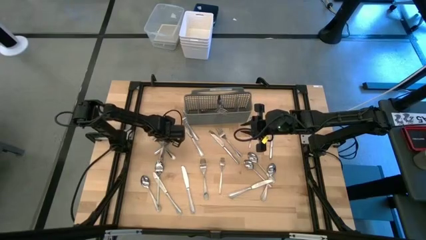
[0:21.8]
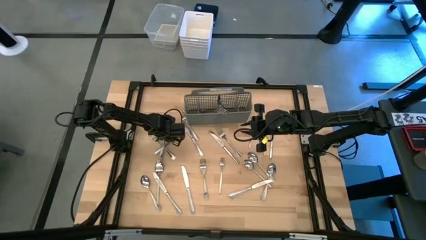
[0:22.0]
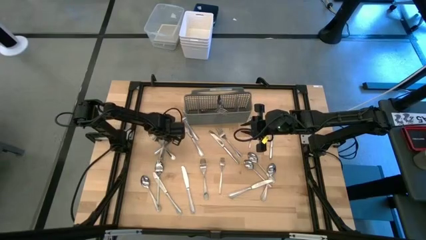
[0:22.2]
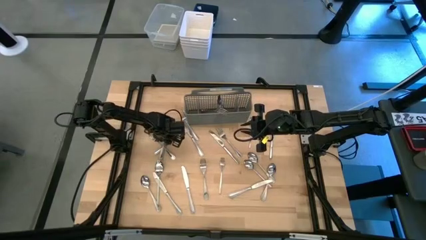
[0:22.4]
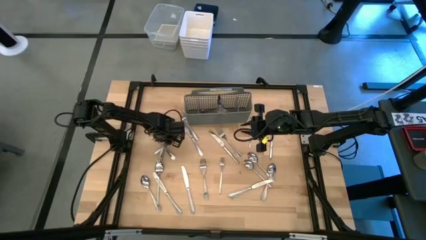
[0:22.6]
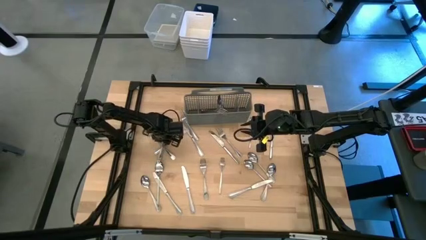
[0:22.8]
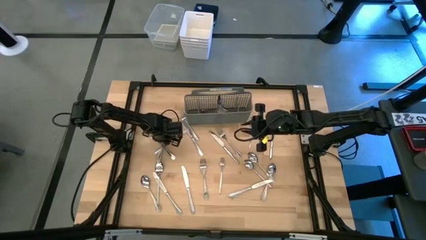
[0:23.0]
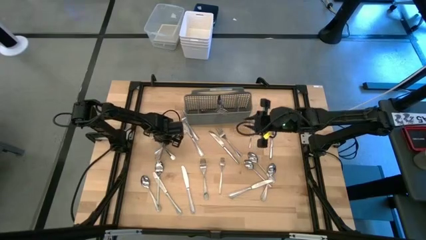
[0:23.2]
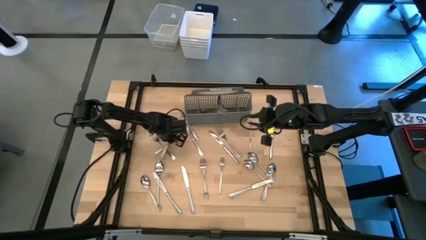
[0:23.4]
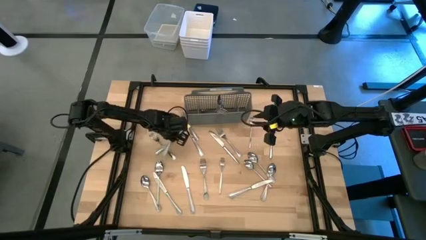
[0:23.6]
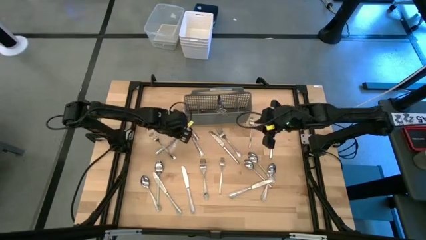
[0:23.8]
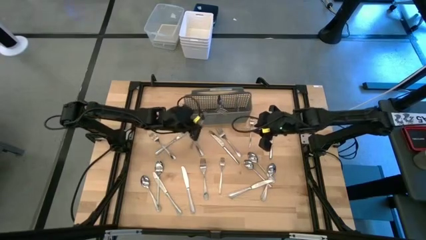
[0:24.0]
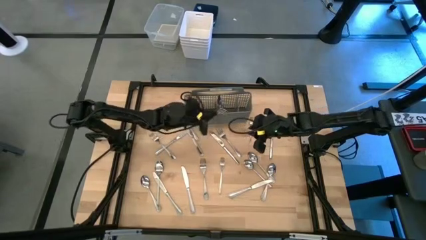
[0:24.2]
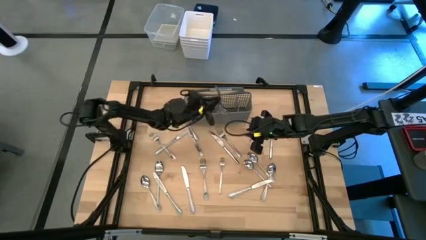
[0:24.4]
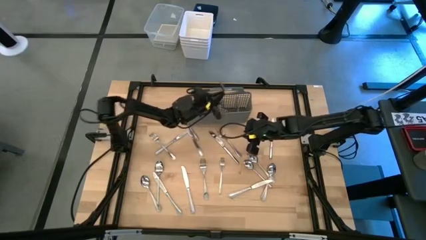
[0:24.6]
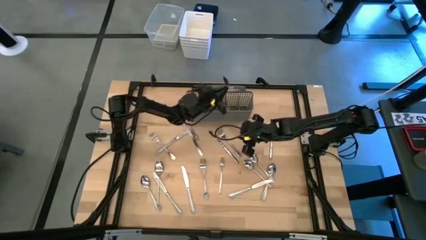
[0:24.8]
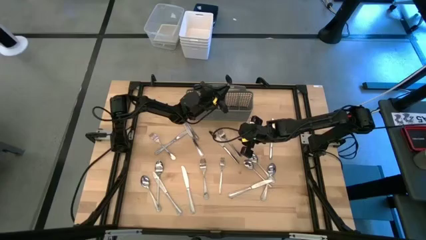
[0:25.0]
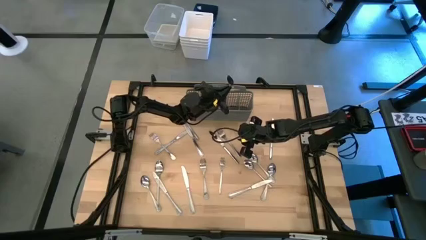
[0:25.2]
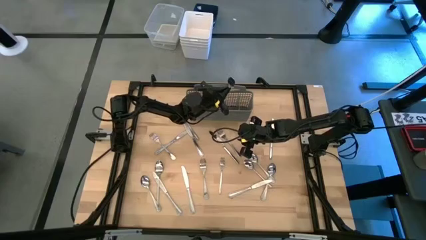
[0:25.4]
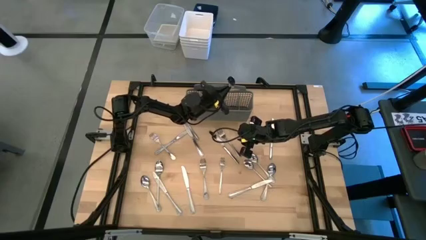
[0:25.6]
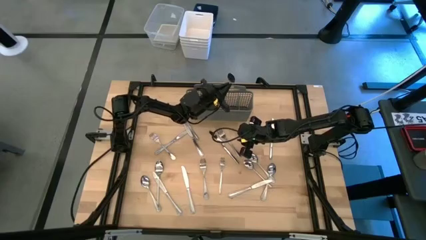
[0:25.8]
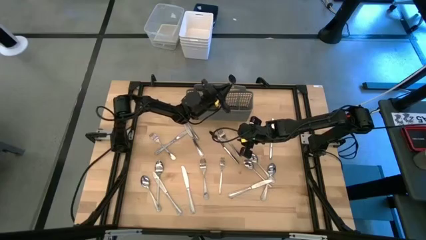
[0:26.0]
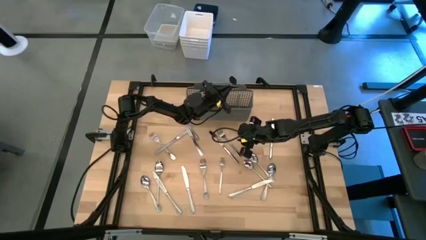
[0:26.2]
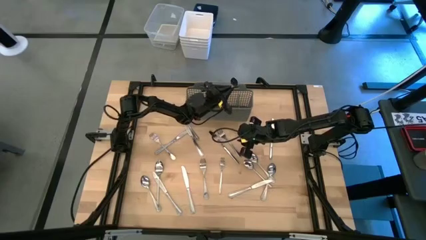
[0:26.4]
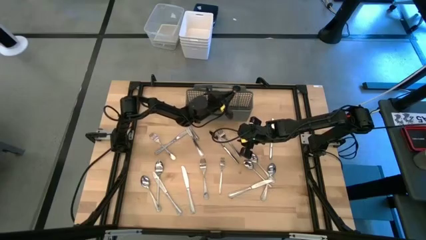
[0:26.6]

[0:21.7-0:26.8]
Task: Sort silverware
Put the silver spoon into the gray silverware organizer

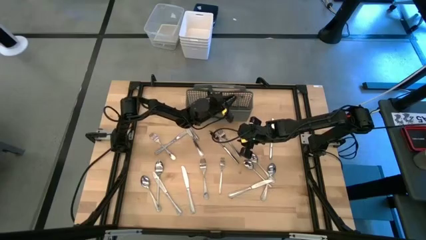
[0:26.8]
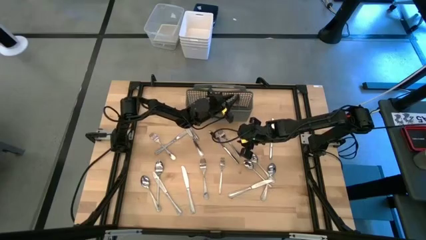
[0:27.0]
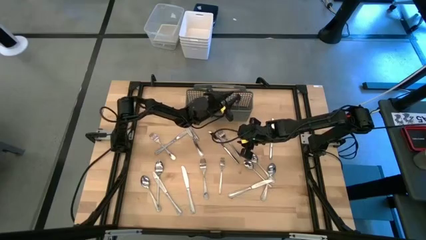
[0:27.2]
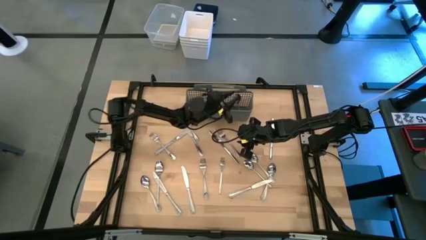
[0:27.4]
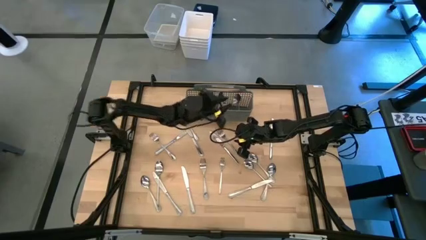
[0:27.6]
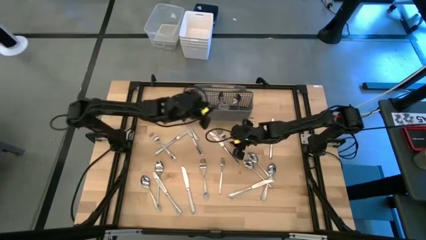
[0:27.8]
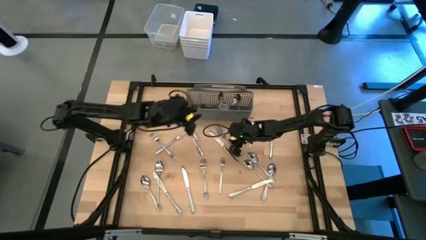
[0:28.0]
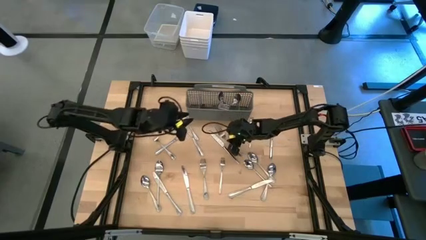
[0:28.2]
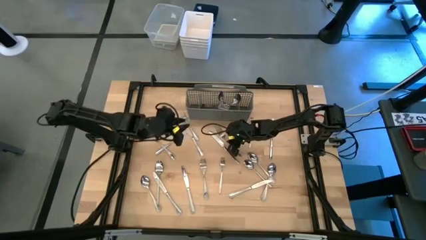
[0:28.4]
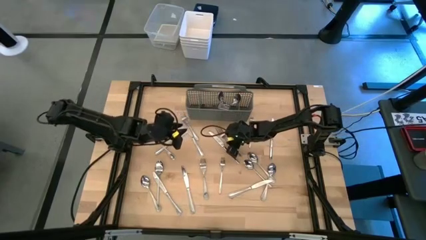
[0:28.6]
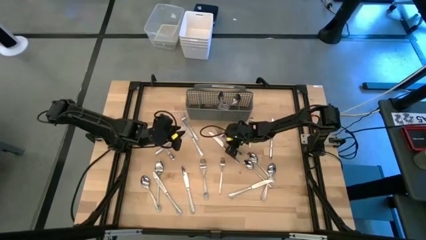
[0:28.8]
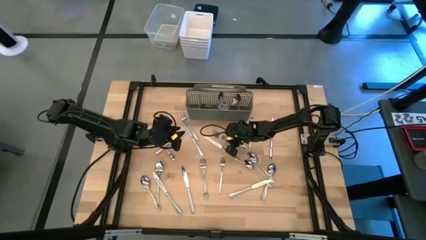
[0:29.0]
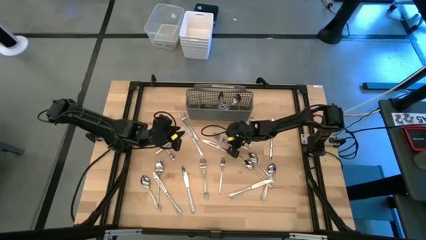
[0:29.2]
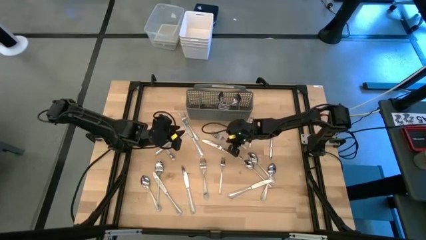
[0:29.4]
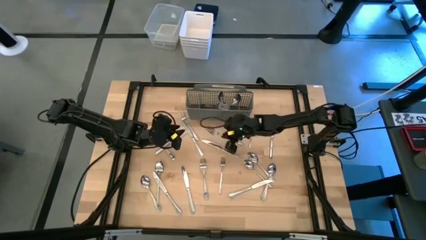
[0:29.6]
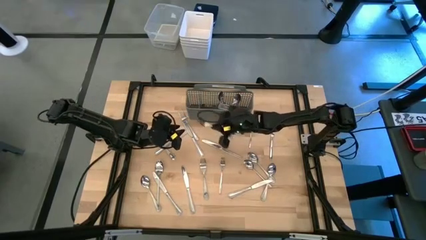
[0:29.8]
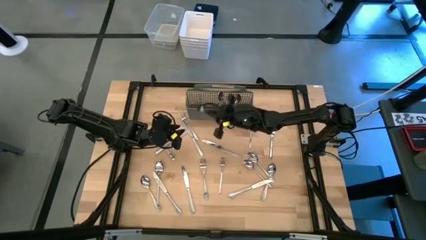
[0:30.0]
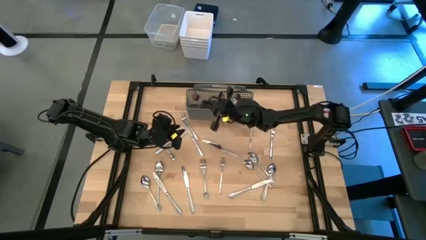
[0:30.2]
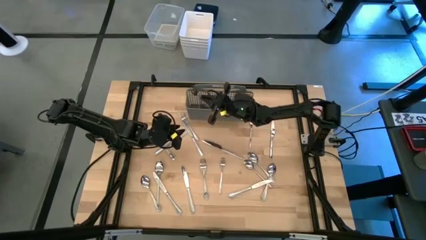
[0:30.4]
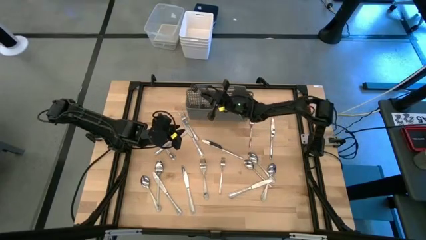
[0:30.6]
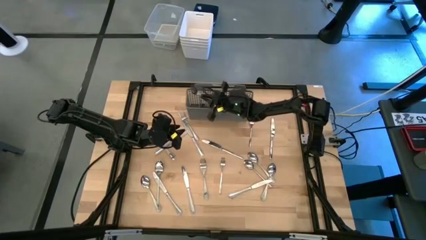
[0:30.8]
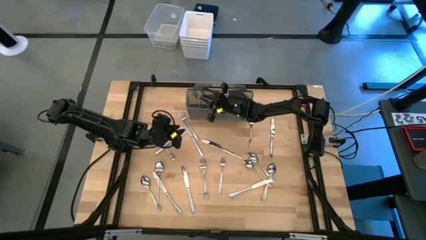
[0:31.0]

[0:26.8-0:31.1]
Put the silver fork into the gray silverware organizer

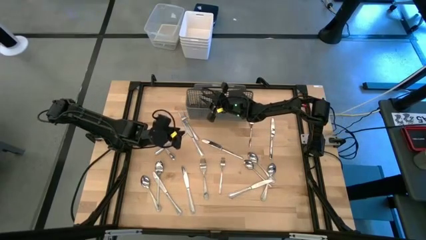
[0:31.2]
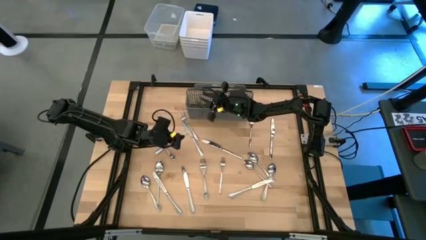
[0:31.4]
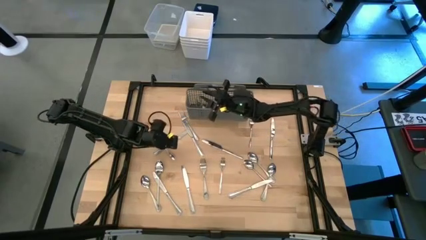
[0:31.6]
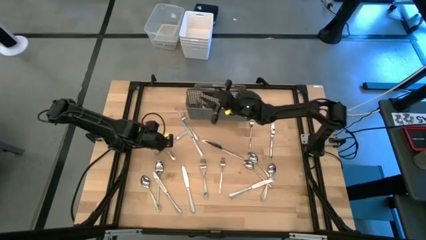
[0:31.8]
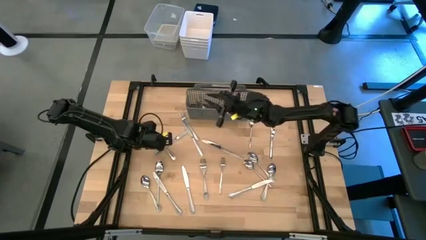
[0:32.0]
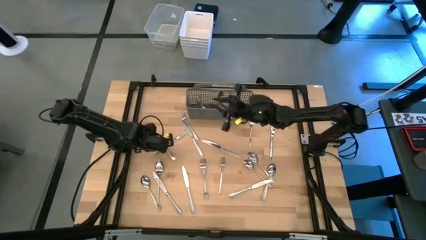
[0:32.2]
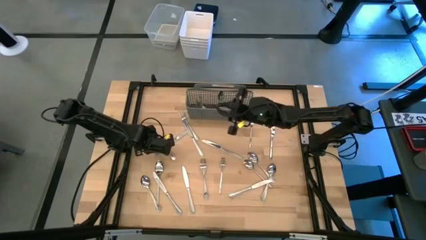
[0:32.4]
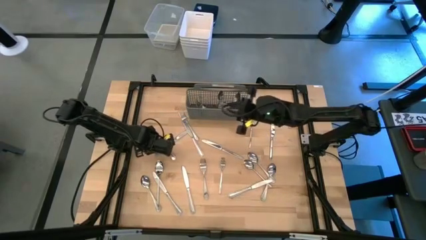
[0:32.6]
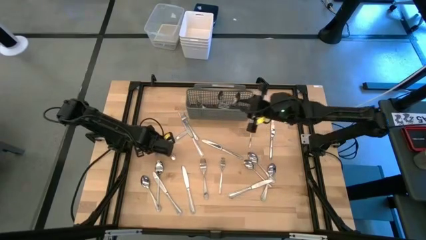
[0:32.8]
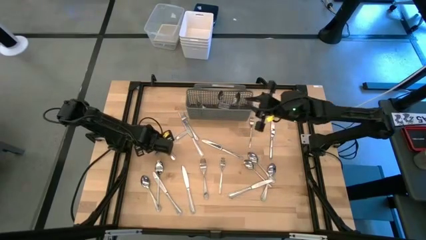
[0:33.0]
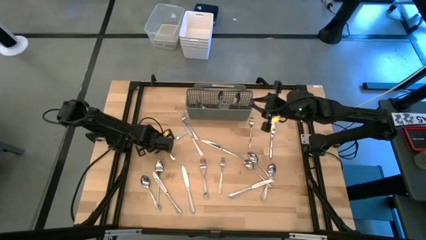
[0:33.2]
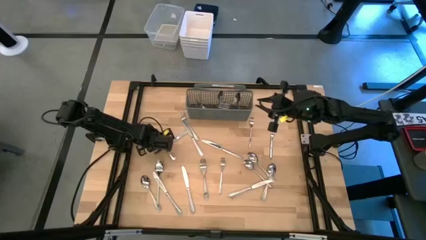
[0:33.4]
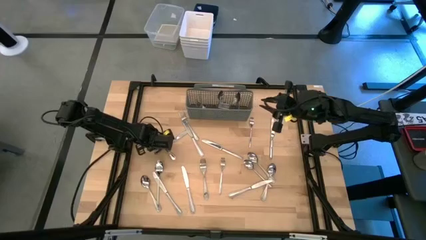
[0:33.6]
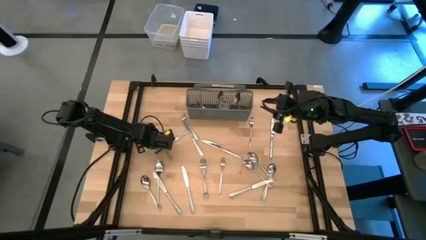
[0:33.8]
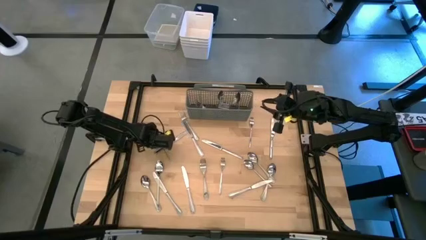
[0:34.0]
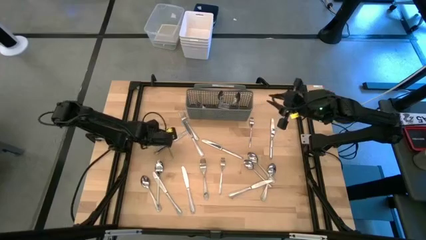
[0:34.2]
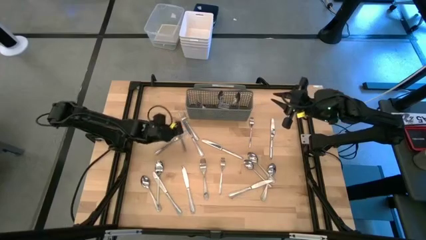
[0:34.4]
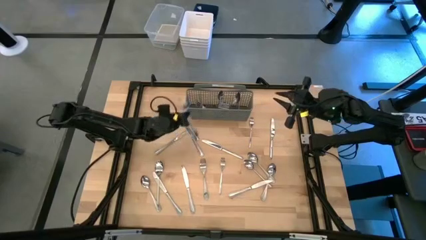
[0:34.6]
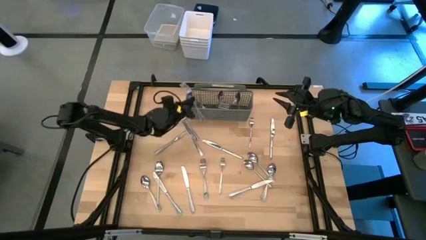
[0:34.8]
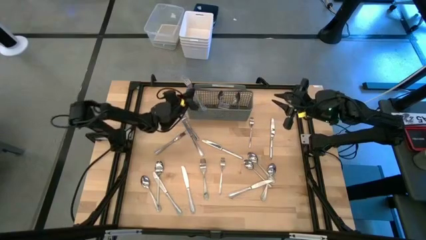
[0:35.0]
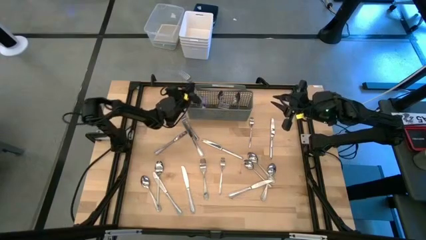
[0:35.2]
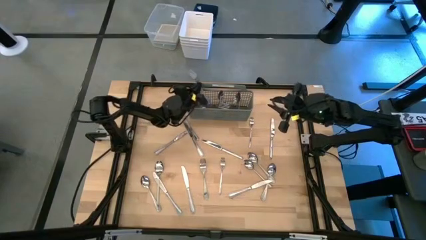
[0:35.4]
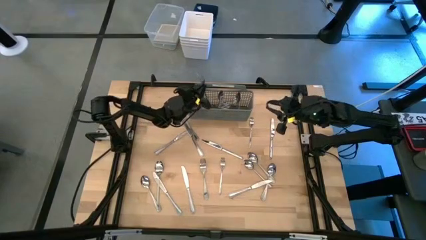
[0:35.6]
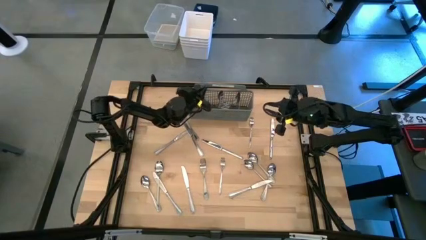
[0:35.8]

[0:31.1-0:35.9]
Put the silver fork into the gray silverware organizer

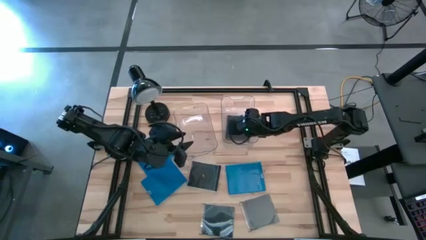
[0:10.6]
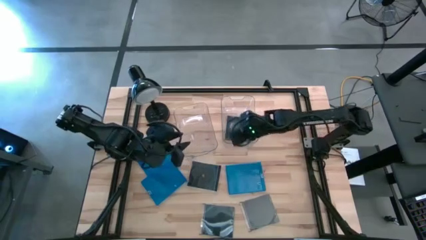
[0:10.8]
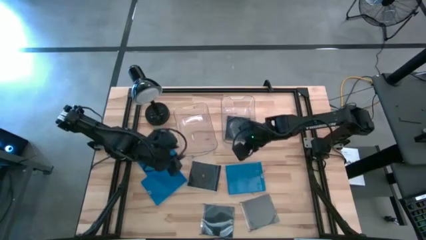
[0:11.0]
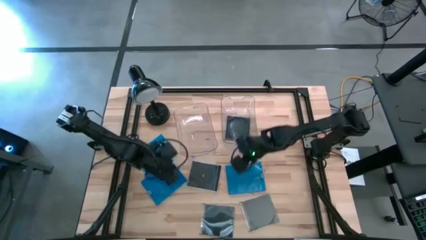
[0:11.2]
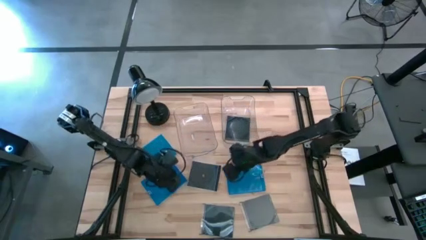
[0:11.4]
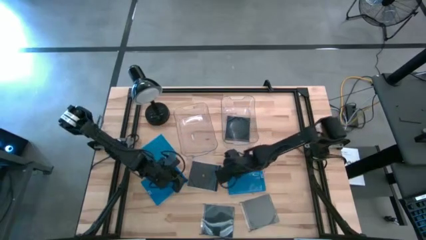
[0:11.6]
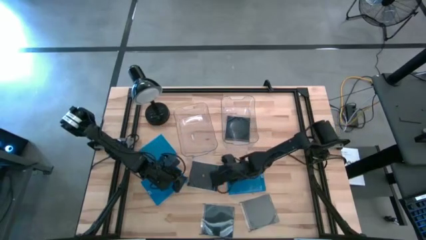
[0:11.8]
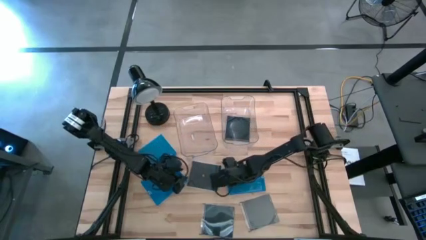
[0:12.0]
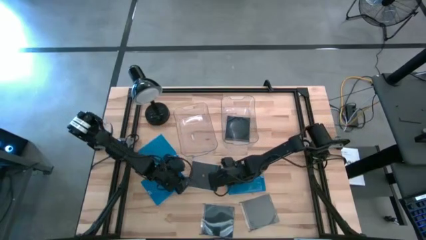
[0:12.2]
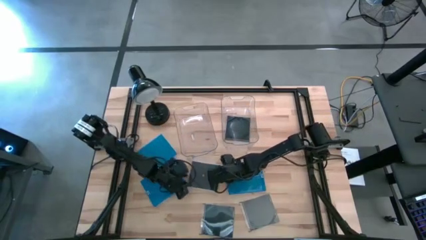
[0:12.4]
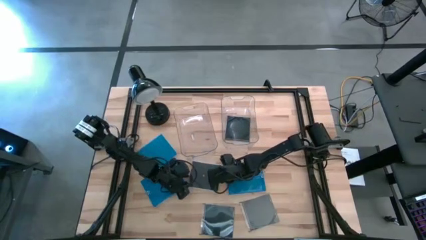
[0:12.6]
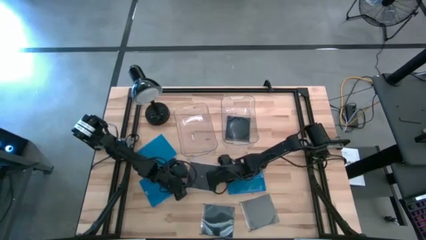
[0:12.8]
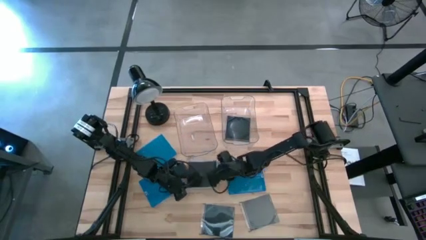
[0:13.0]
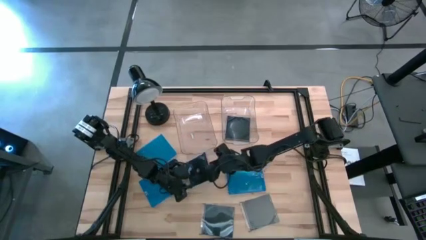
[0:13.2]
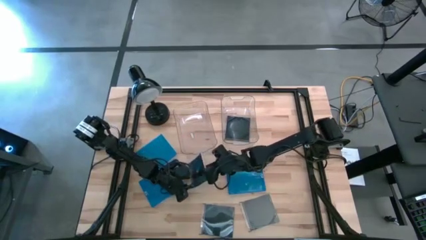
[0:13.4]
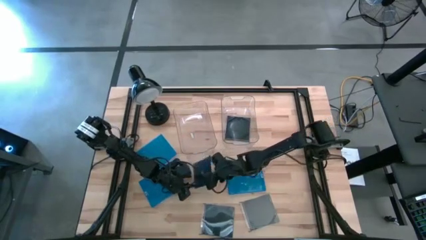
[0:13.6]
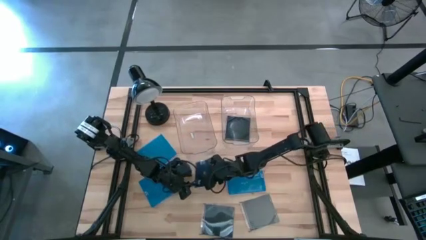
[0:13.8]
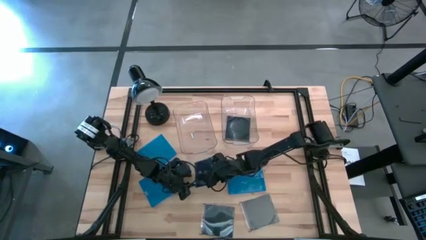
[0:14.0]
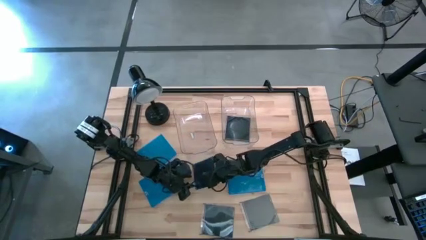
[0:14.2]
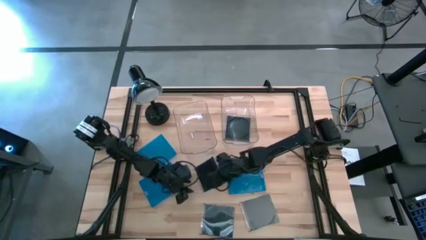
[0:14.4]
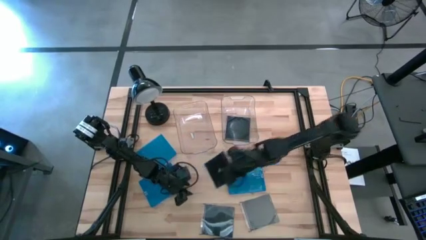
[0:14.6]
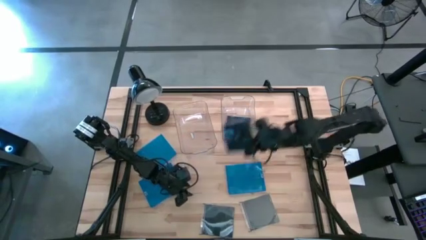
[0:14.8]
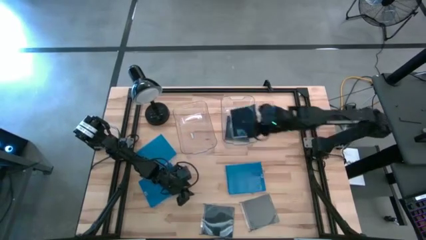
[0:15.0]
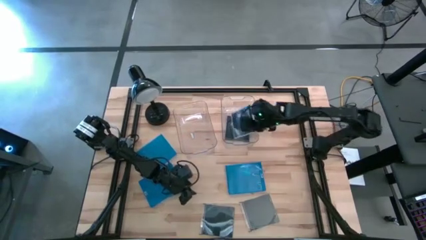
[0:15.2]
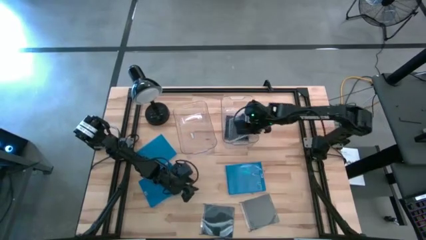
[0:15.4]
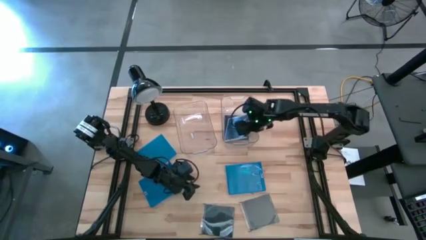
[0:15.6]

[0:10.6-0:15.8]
Task: Pick & place jewel cases by type
Put the top black CD case into the right transparent bin
